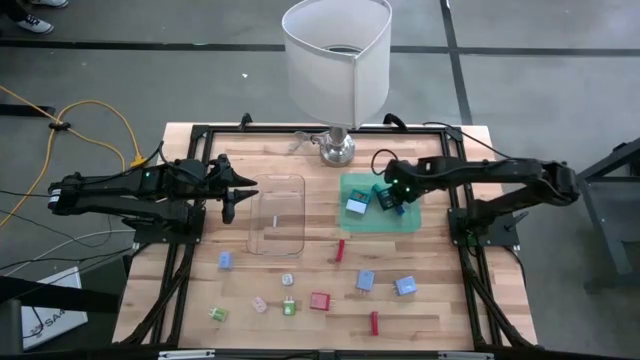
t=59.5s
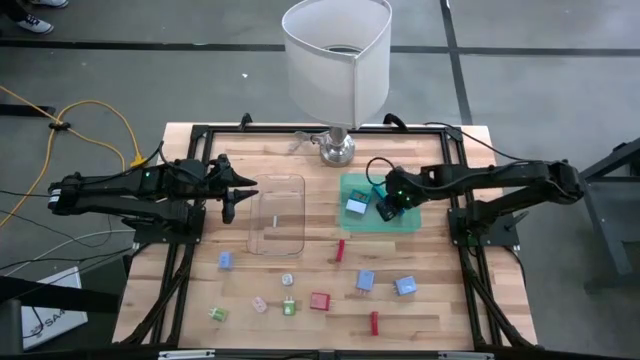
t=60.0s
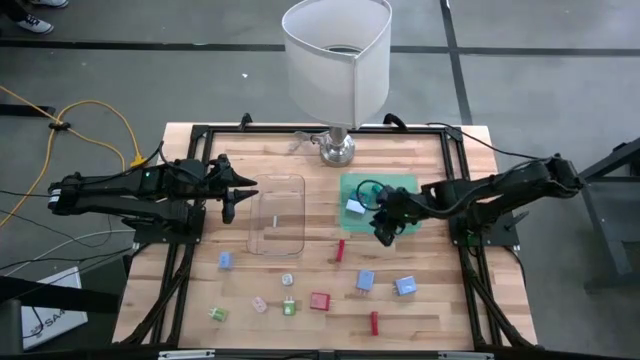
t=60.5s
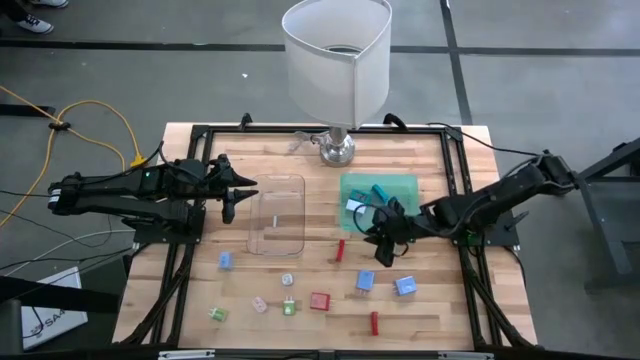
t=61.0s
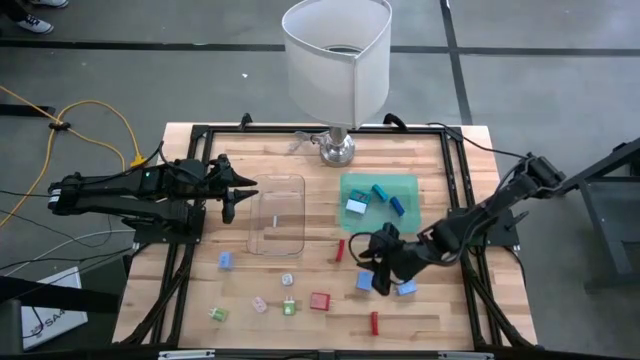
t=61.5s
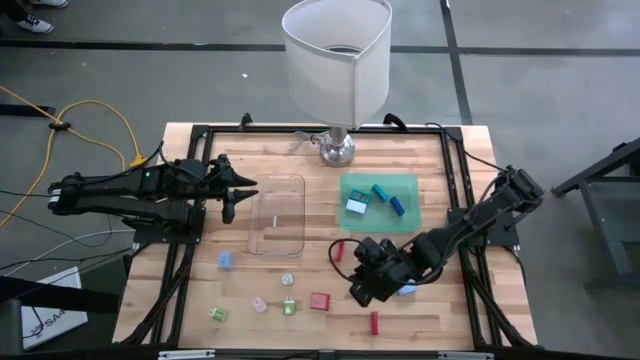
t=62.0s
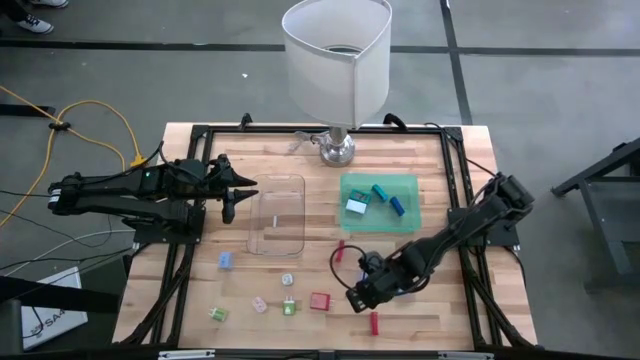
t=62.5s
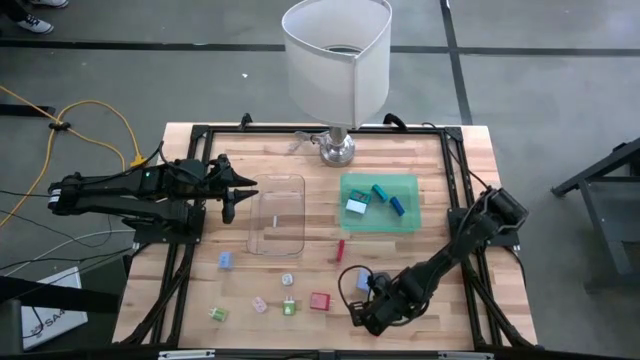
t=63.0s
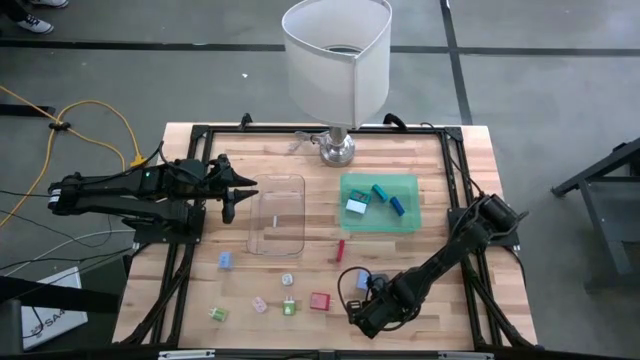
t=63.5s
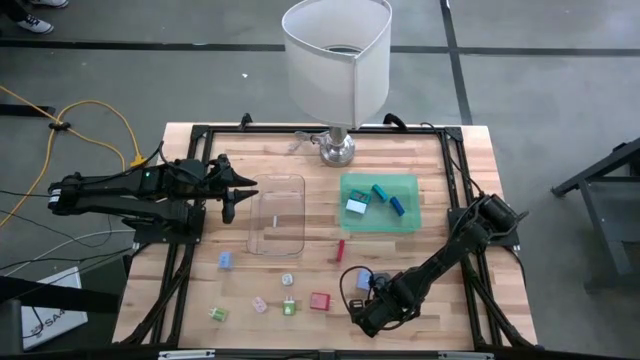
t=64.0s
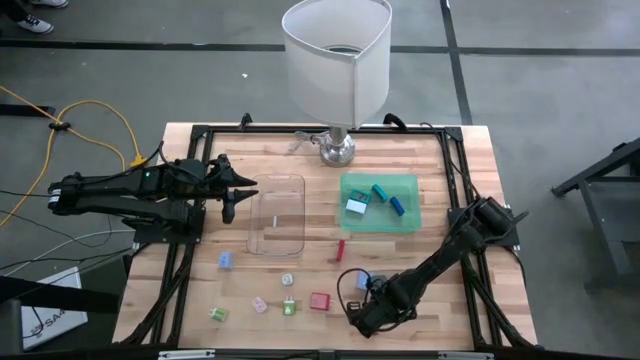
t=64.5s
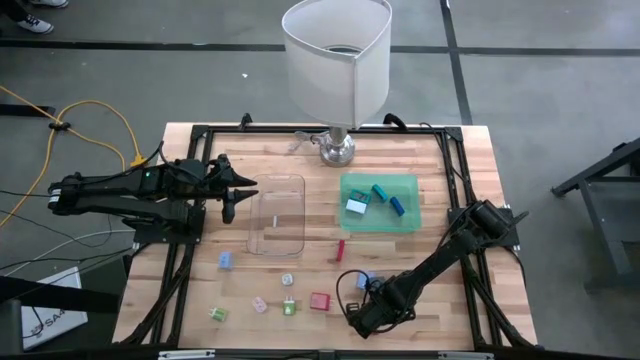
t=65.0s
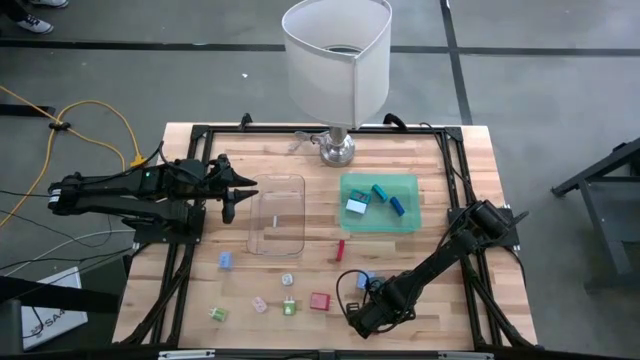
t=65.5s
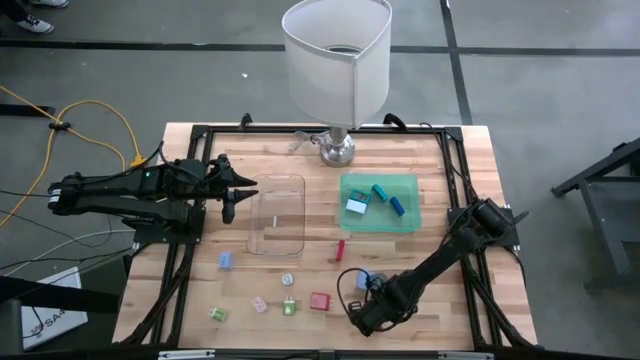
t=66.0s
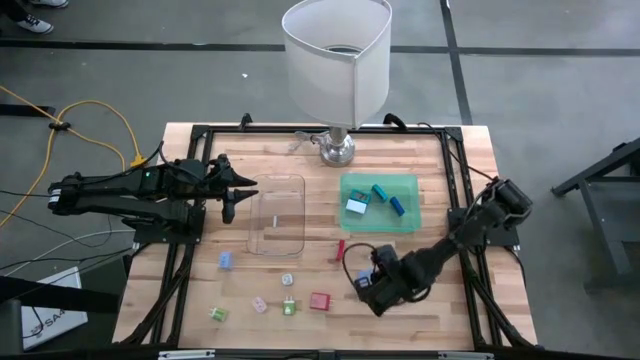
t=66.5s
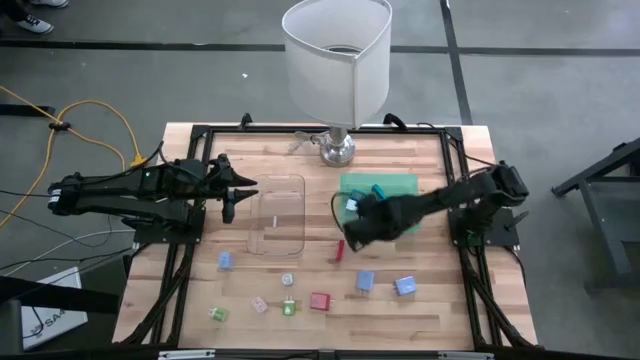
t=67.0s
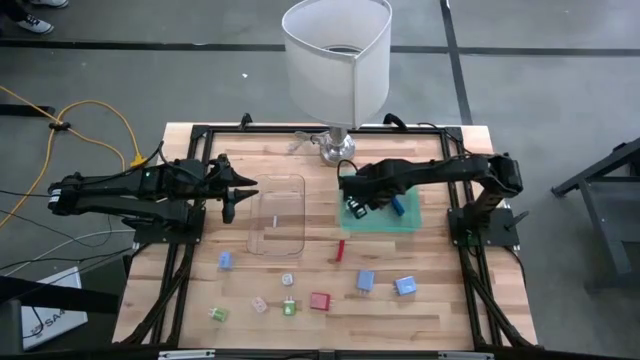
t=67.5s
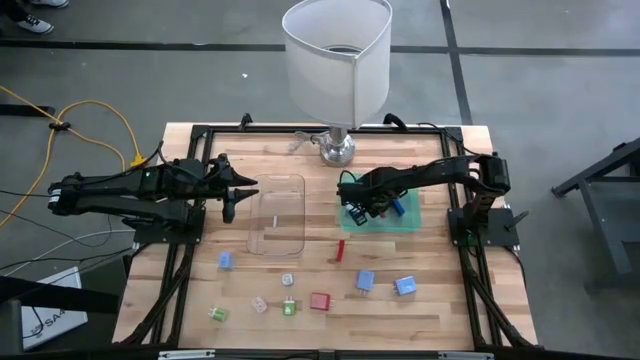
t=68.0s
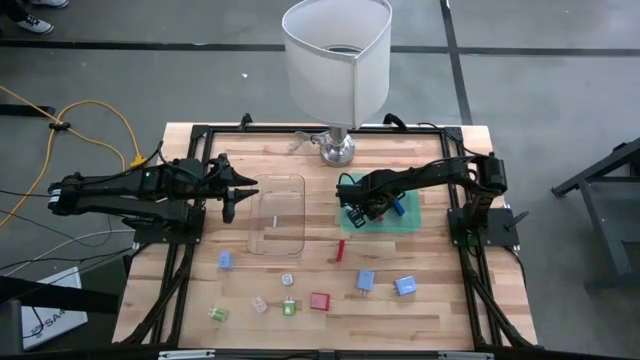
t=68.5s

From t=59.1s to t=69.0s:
Task: Pick & Place Office items
Put the bottom red timer into the green bin

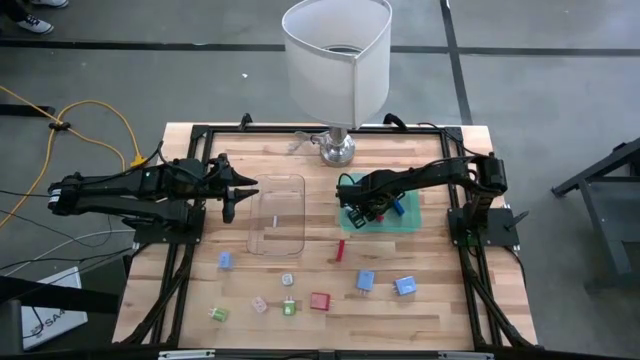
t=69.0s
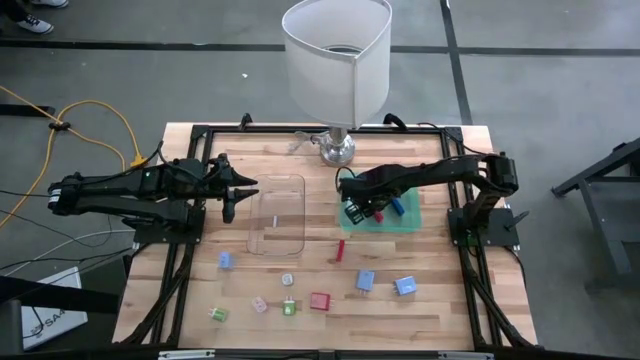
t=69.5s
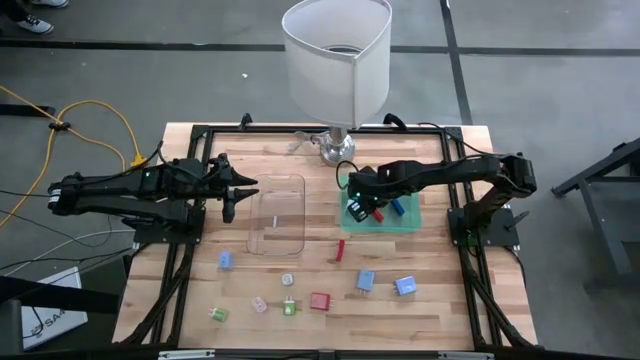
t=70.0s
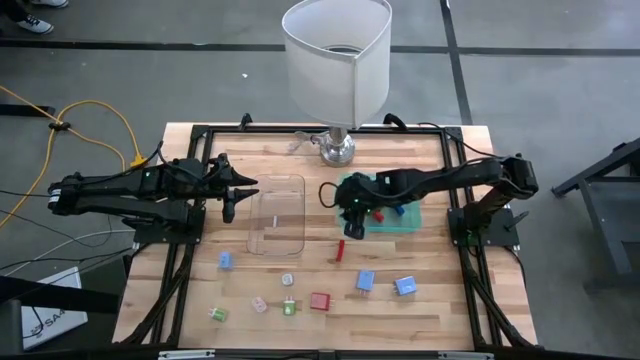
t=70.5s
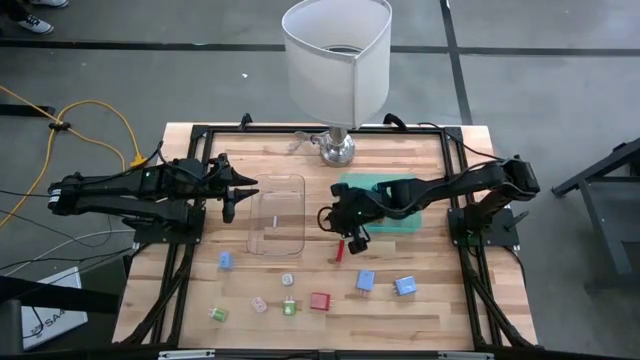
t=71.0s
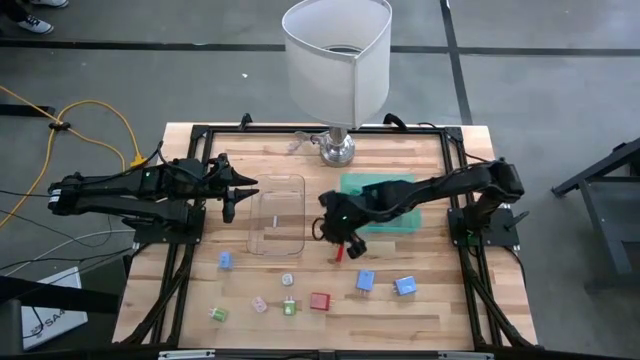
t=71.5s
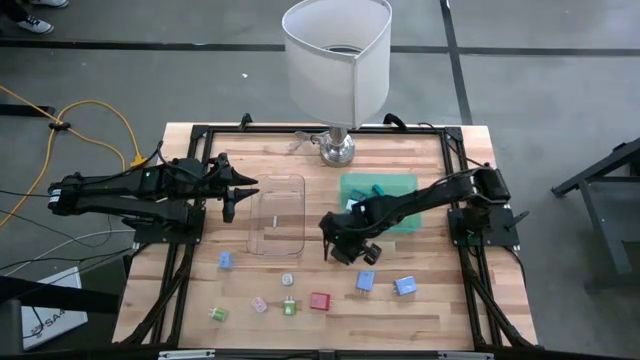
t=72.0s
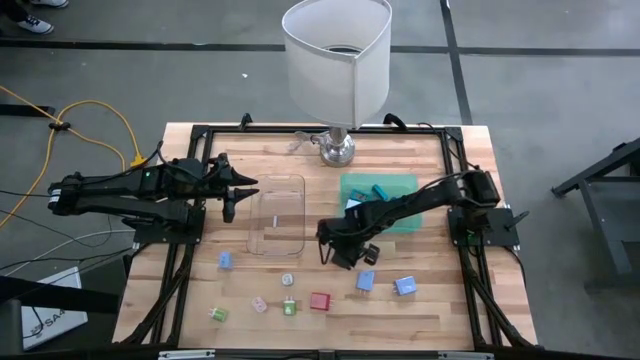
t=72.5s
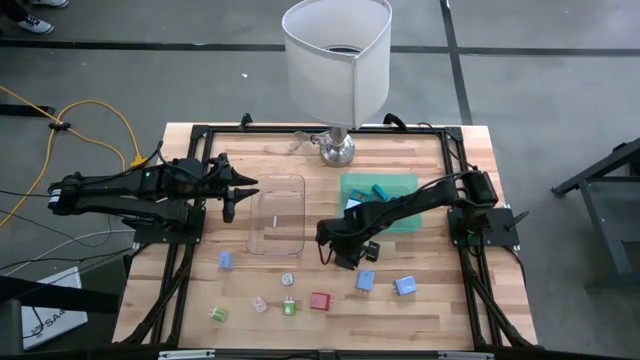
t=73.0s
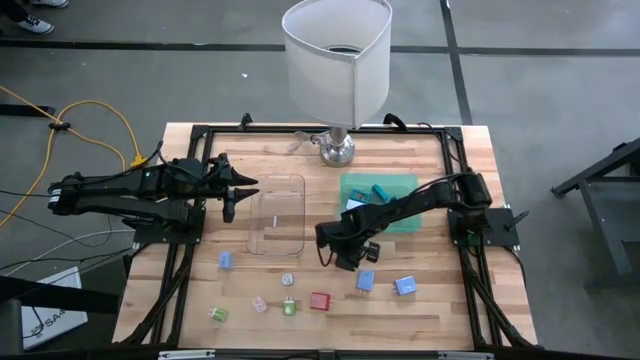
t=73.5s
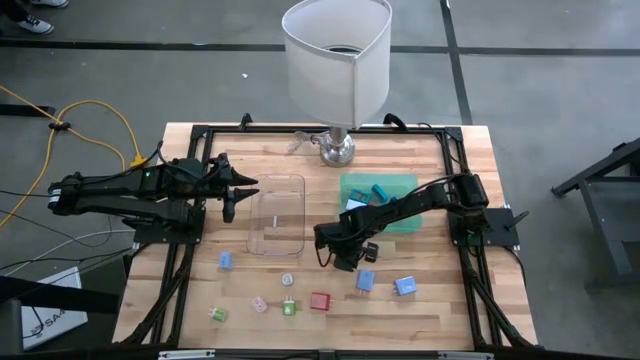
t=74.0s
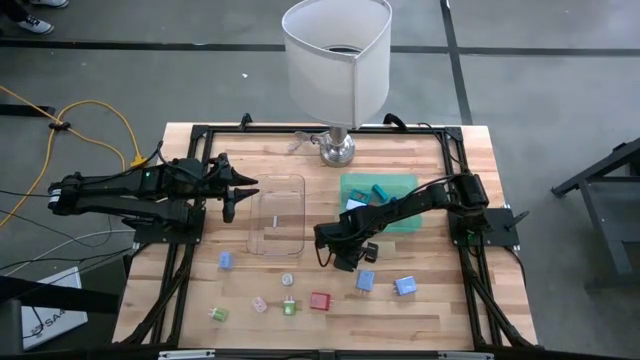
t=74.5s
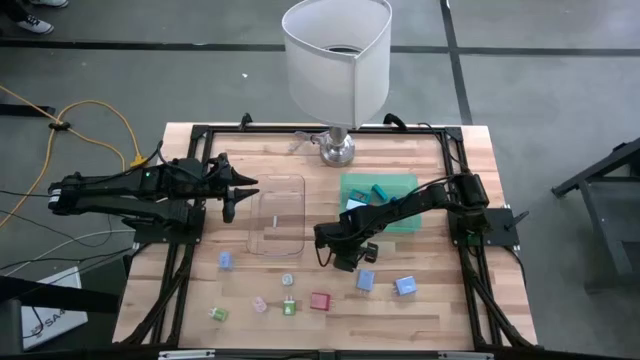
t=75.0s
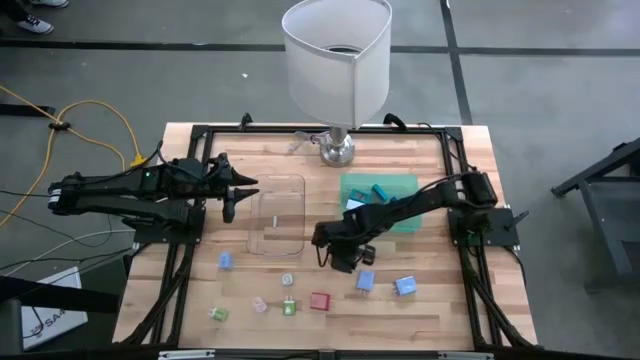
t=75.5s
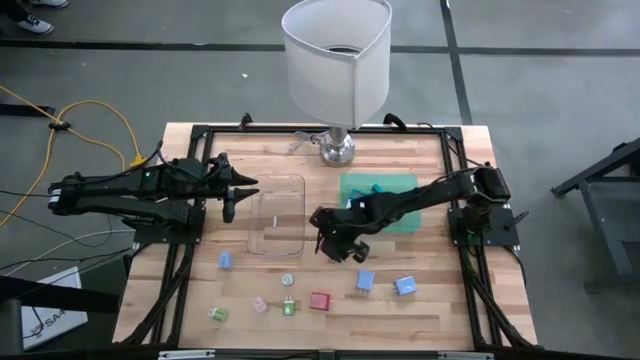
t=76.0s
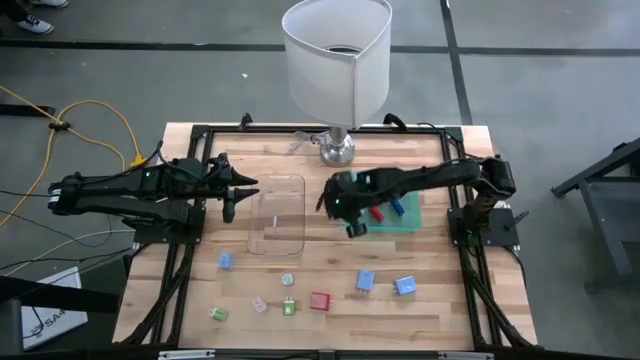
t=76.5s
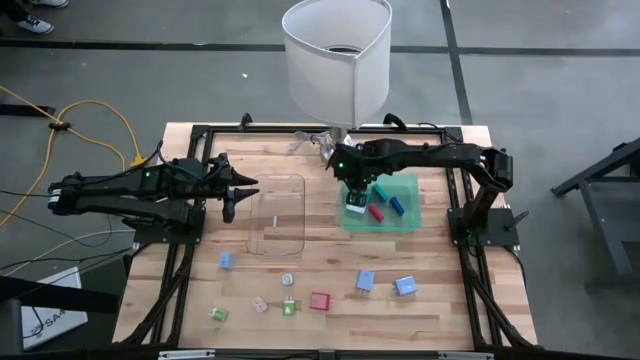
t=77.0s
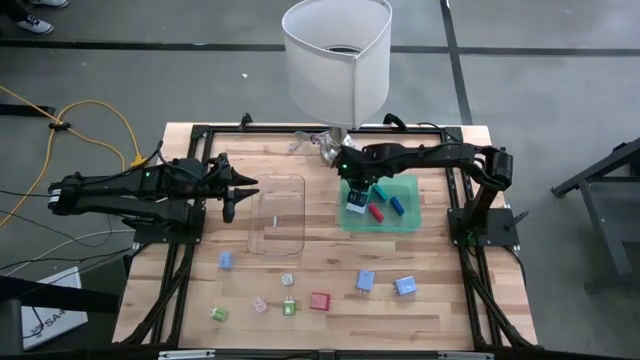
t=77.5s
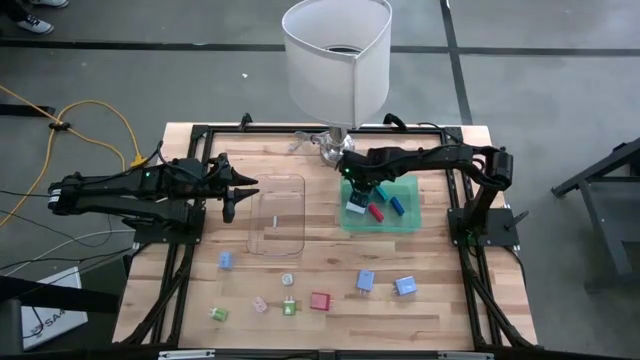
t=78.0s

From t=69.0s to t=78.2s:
Put the red timer into the green bin

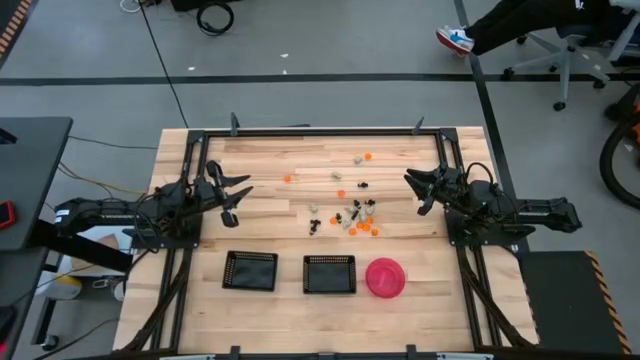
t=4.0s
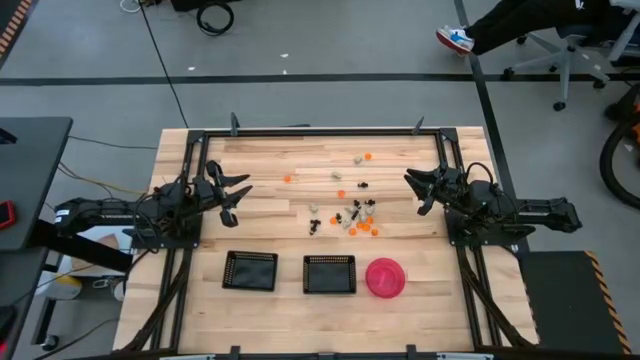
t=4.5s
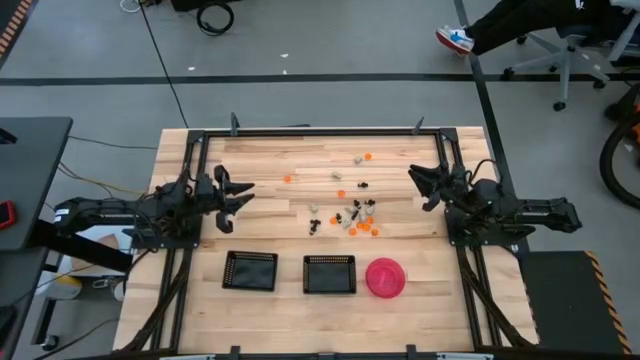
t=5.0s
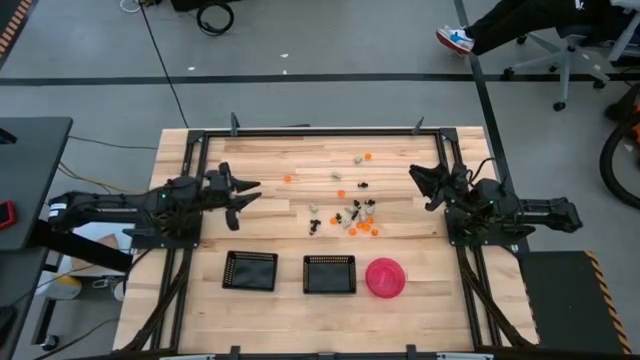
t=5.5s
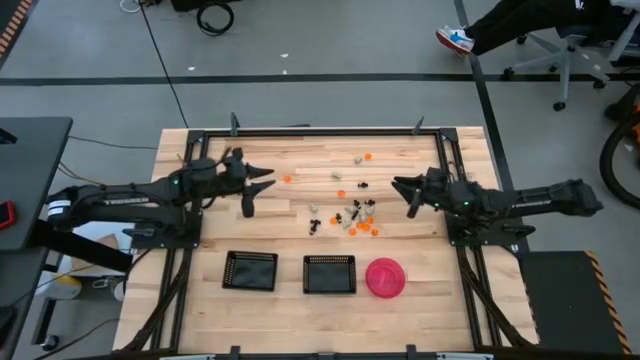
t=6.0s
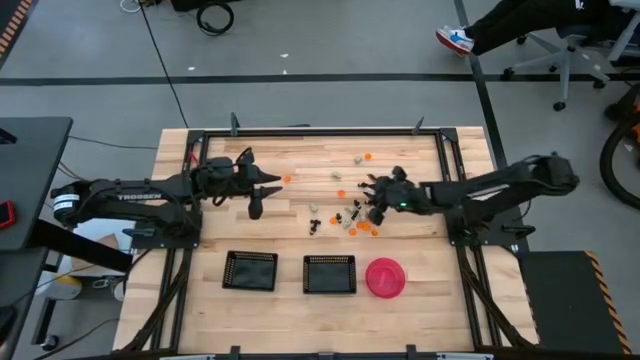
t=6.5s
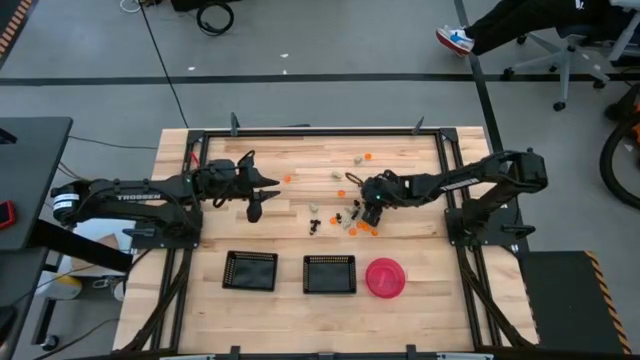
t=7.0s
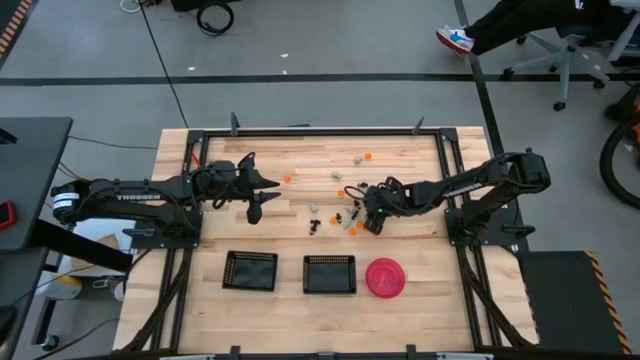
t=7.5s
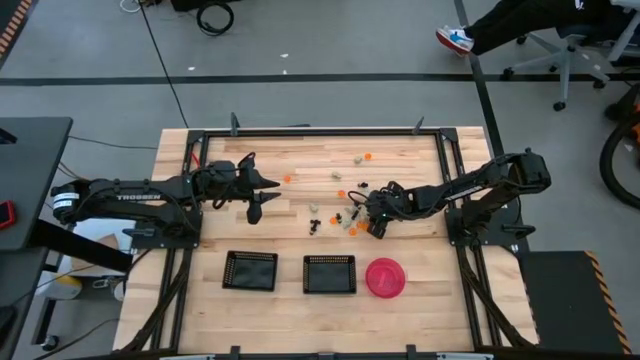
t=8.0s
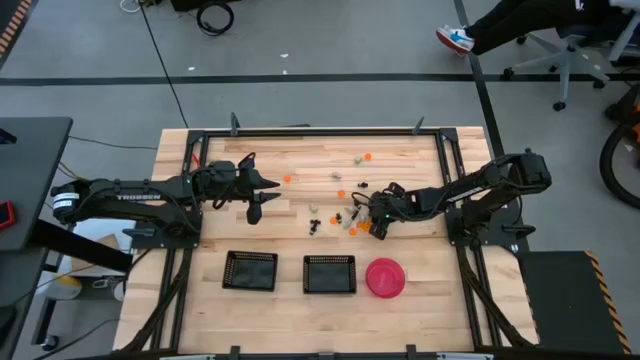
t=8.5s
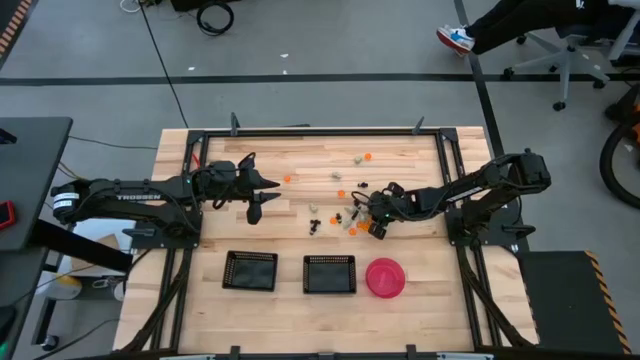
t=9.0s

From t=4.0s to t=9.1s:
Task: Sort Halloween decoration
Put the white skull toy into the right black bin
